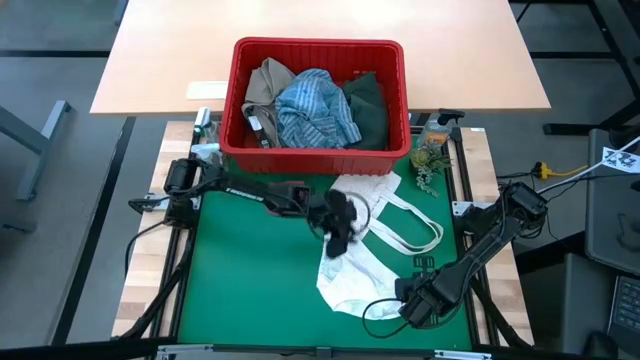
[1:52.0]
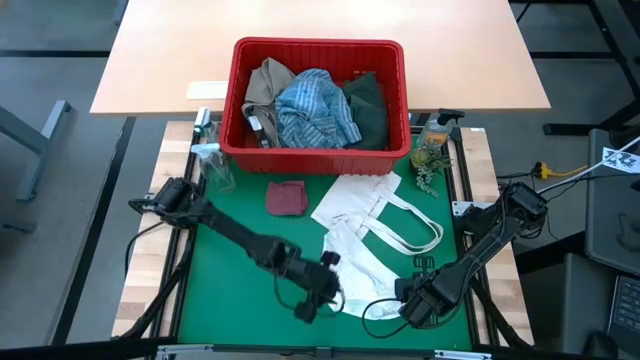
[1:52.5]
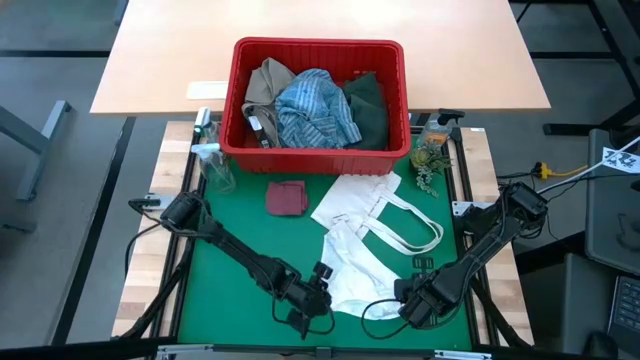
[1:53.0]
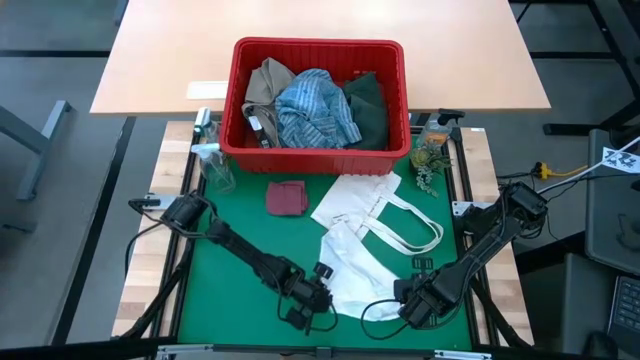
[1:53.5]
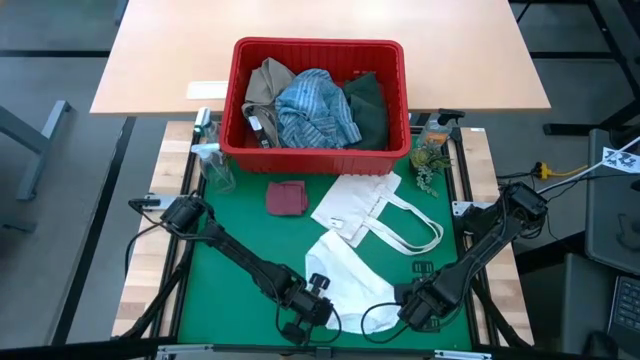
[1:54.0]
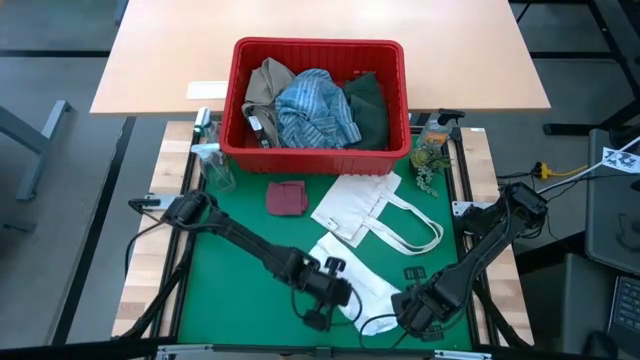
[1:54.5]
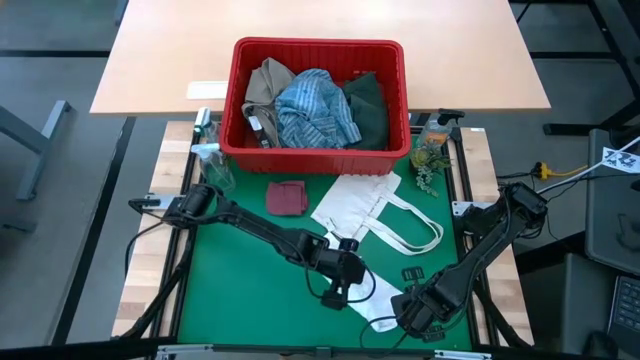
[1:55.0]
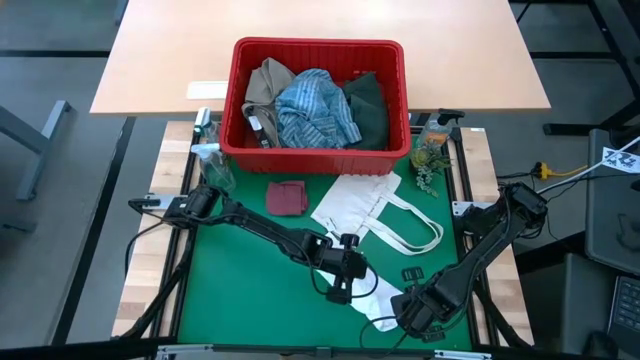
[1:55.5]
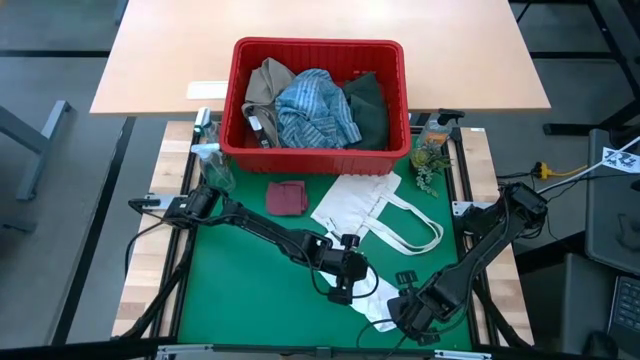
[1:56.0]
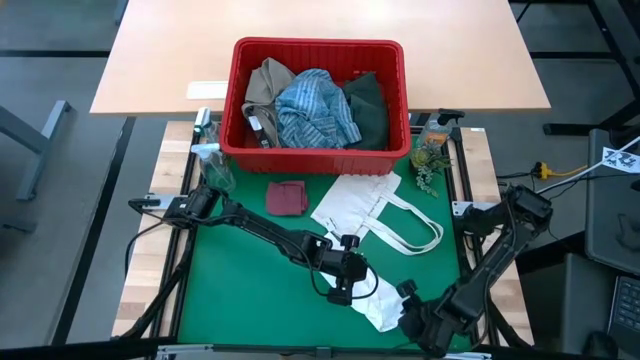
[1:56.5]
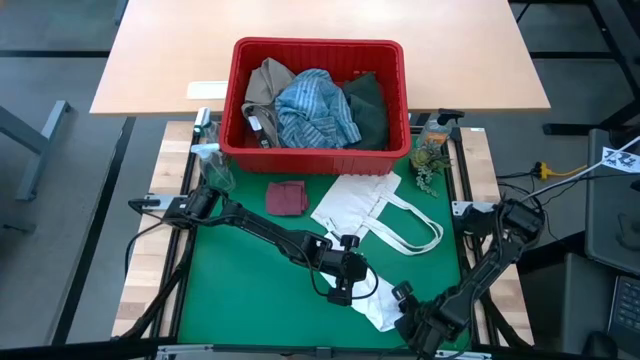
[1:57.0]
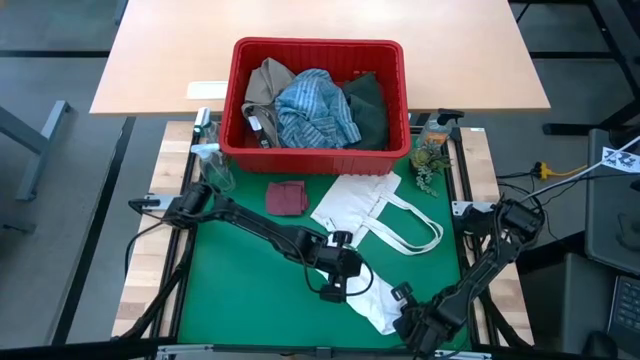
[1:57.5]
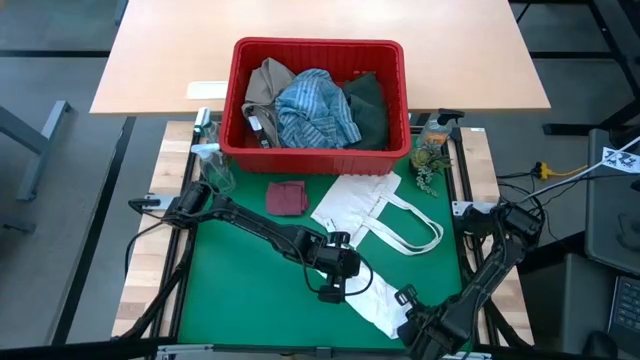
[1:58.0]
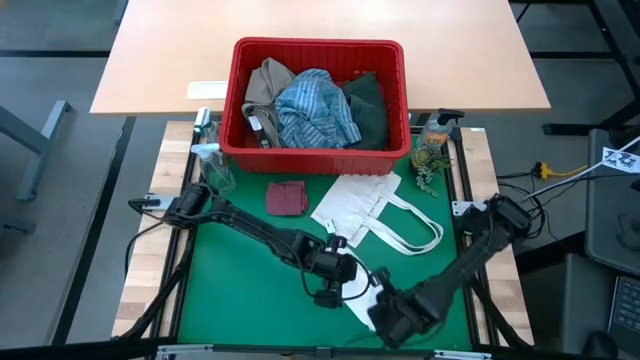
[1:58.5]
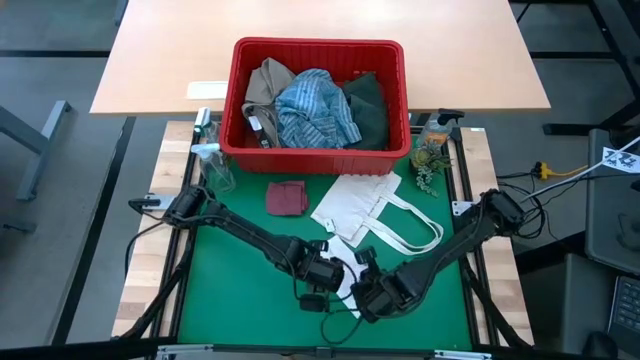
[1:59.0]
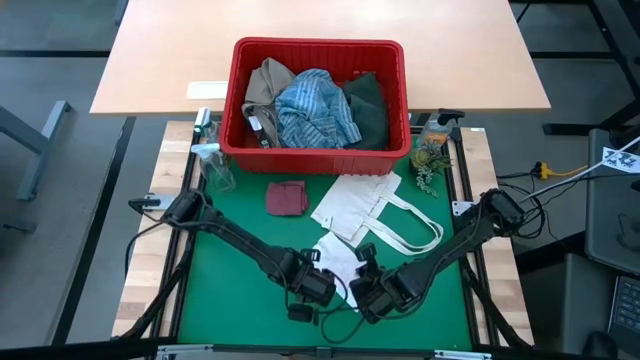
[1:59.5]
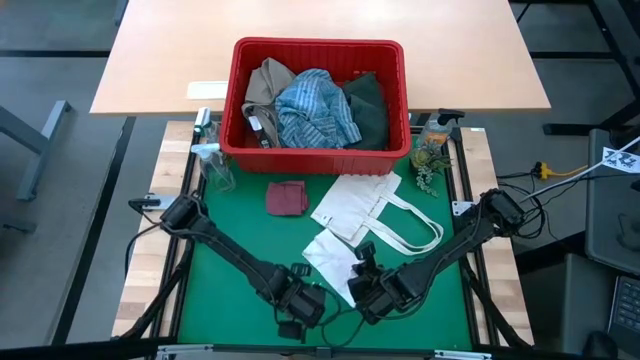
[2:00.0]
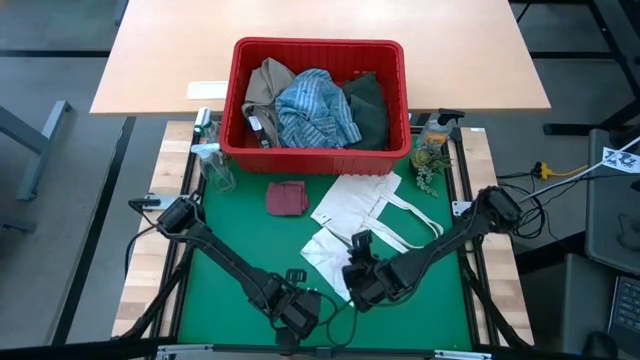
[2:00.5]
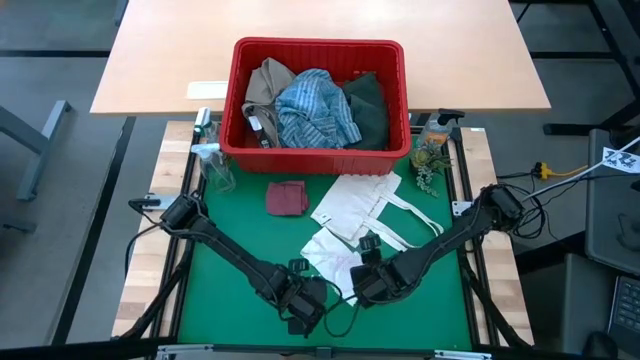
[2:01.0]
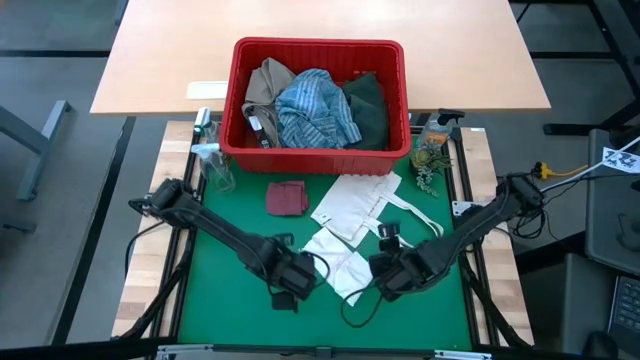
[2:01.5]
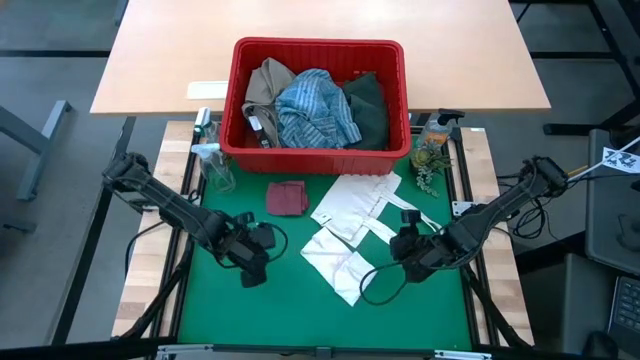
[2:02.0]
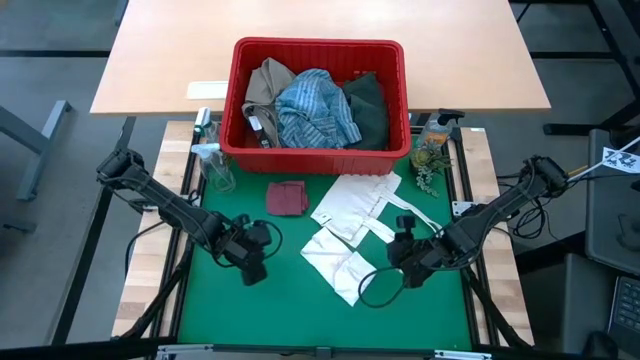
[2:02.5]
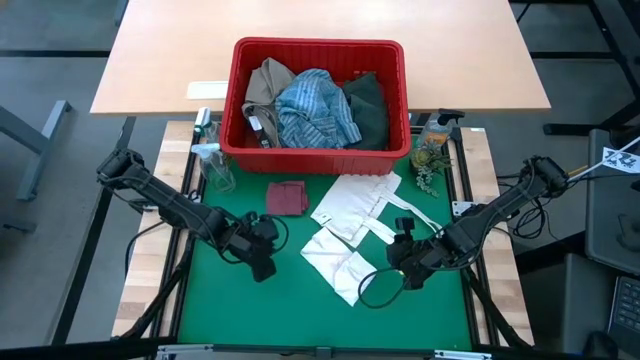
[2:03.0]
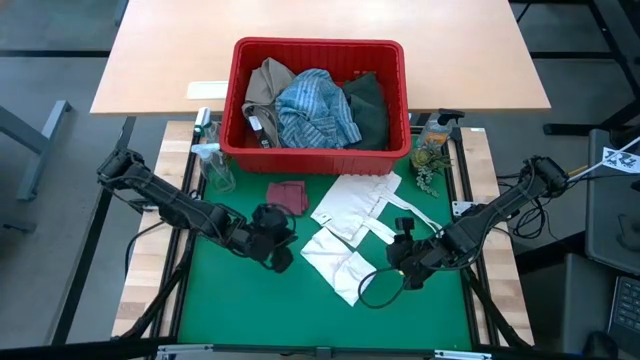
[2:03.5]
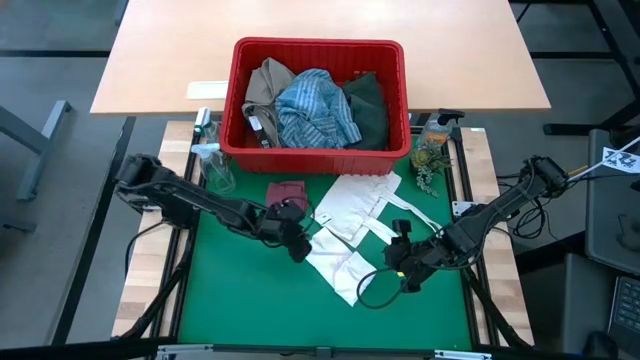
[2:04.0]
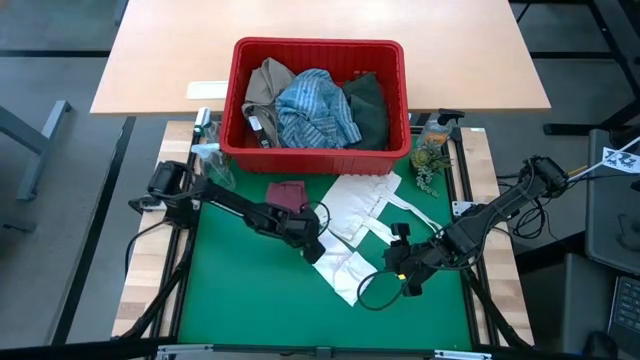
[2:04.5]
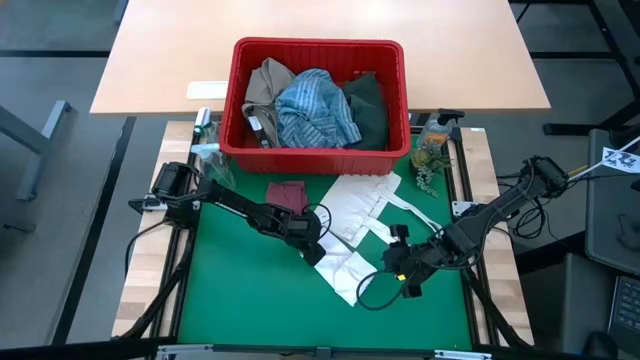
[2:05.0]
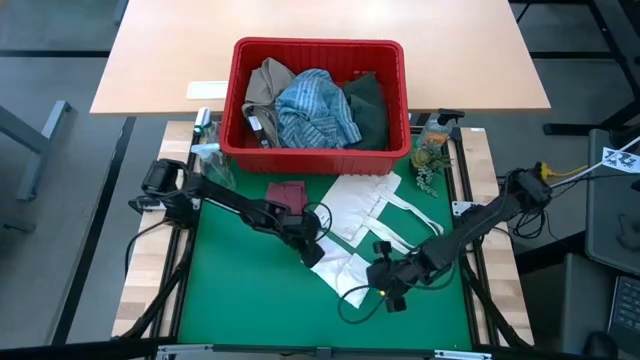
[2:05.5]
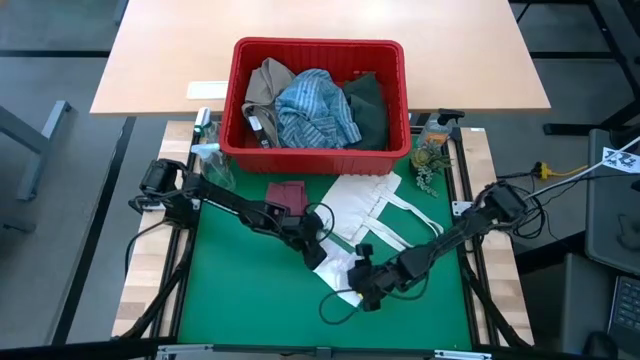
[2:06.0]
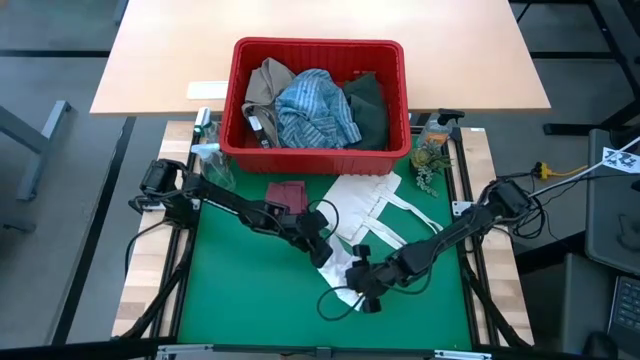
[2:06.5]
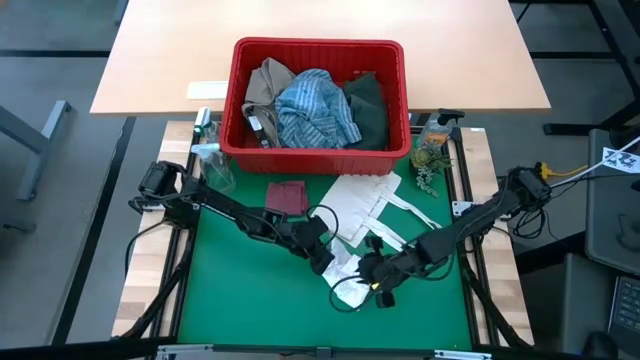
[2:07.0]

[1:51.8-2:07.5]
Task: Fold Laundry from Bin
Fold the white underwear

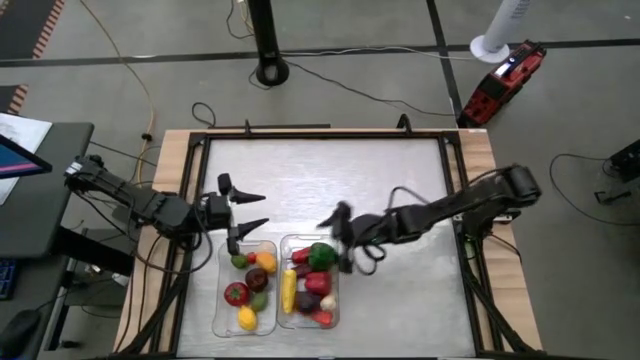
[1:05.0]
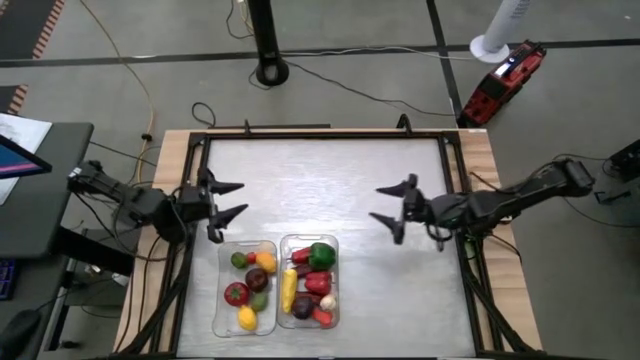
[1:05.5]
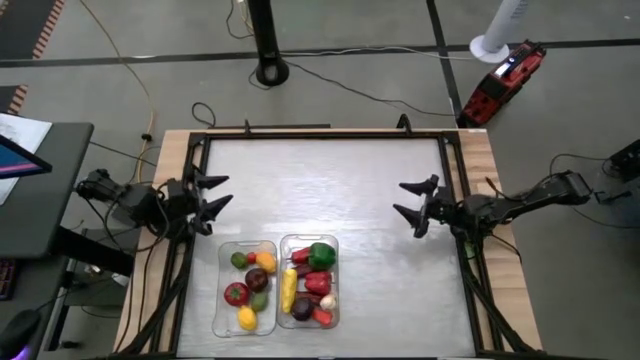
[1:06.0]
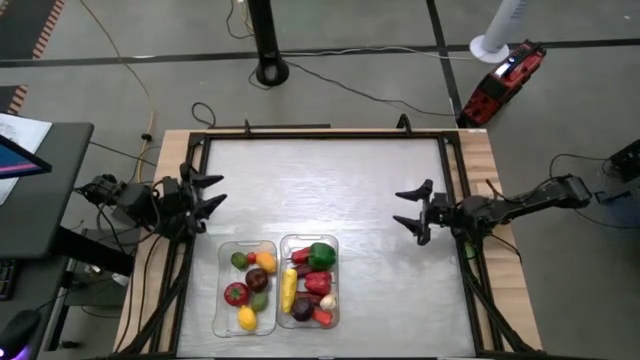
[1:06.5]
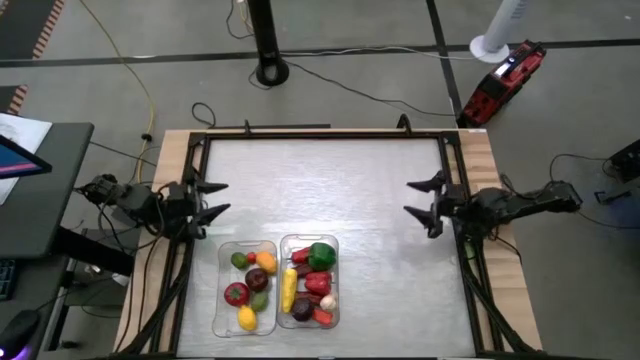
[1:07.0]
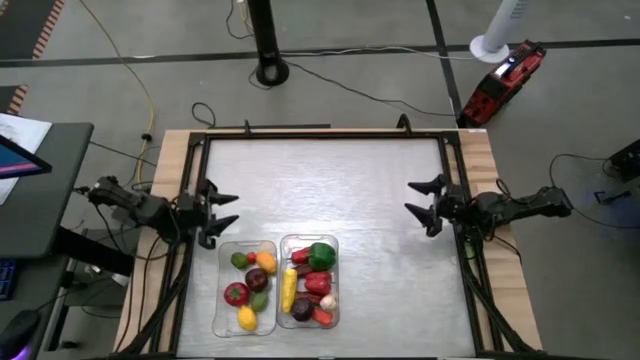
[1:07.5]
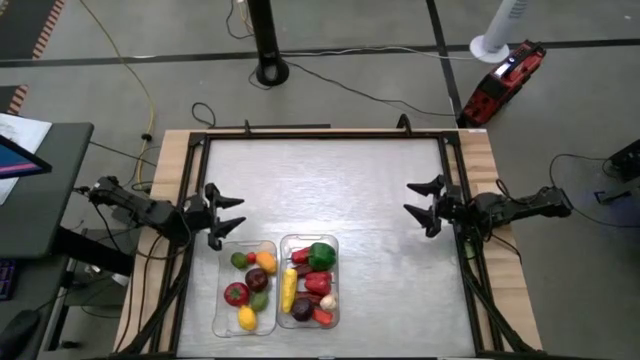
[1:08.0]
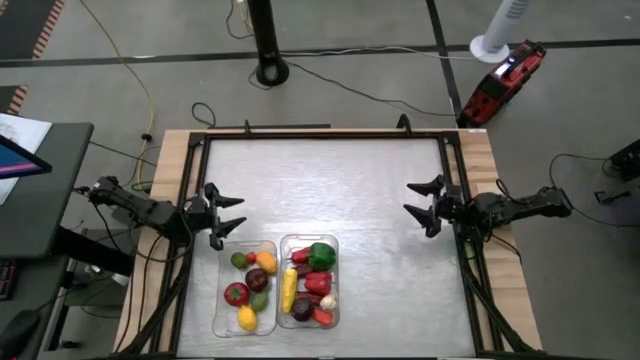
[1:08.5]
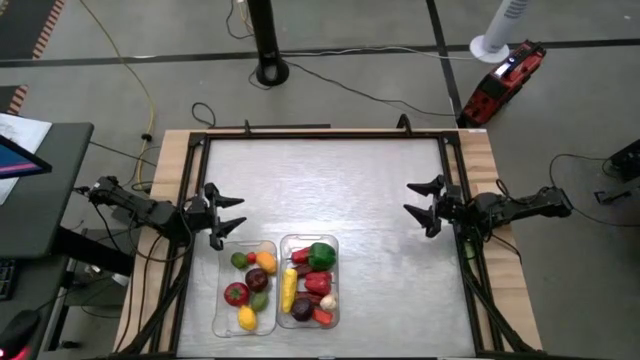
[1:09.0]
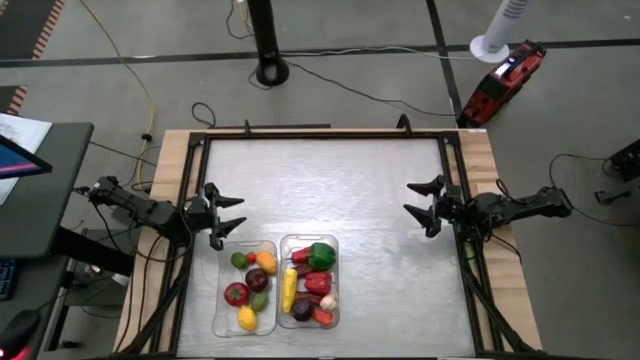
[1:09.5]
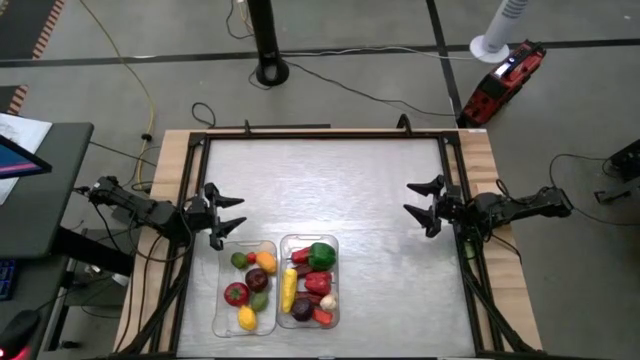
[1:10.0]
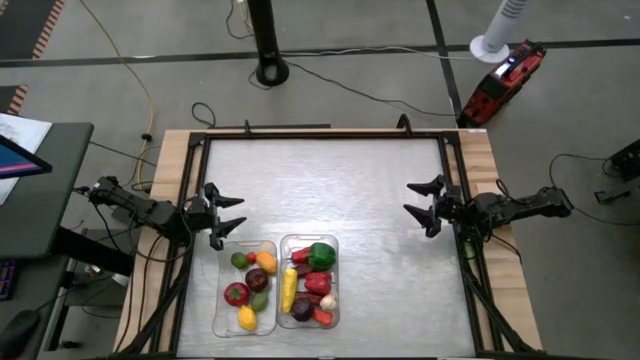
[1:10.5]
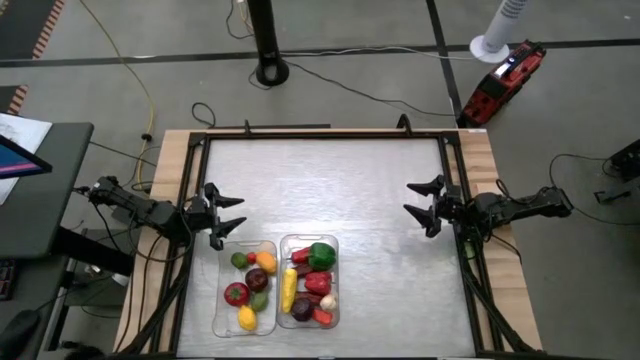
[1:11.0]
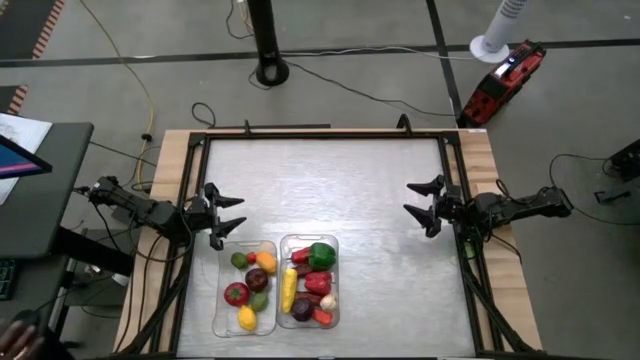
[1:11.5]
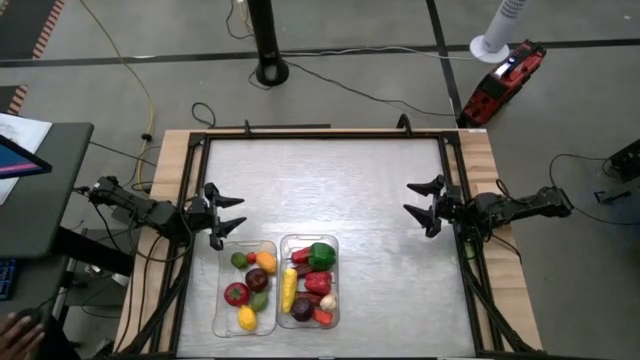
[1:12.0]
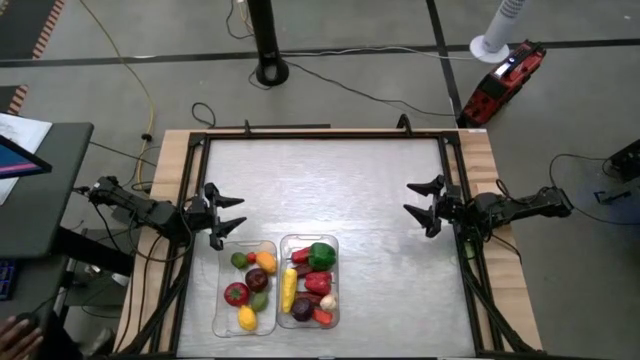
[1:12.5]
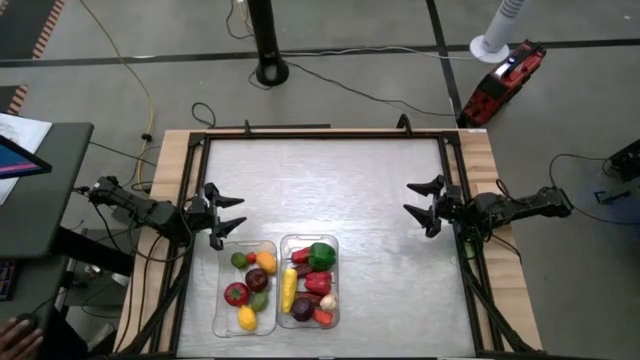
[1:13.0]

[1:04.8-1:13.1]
Task: Sort produce into baskets
Return to Home Position
